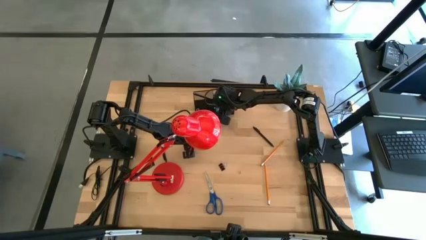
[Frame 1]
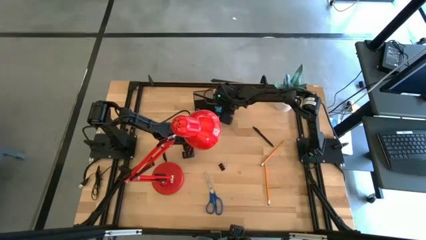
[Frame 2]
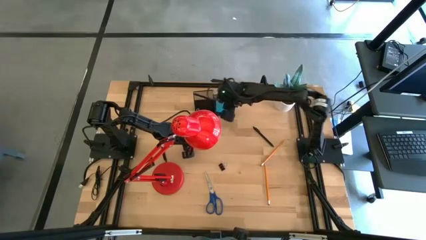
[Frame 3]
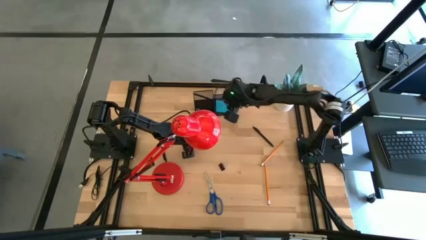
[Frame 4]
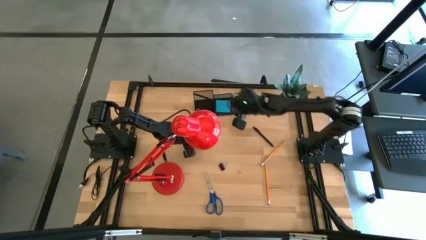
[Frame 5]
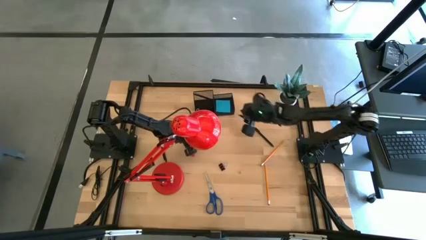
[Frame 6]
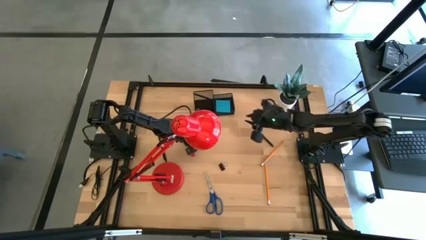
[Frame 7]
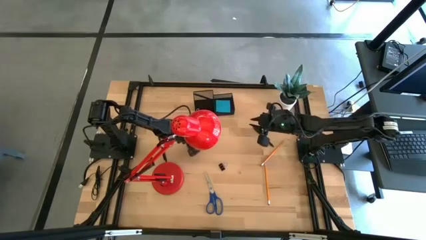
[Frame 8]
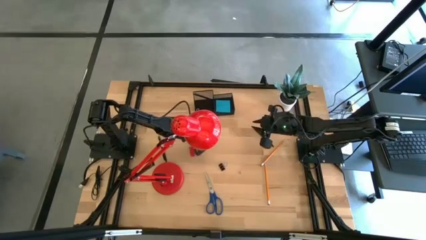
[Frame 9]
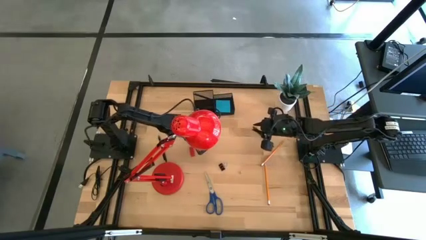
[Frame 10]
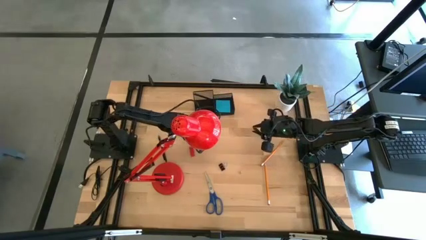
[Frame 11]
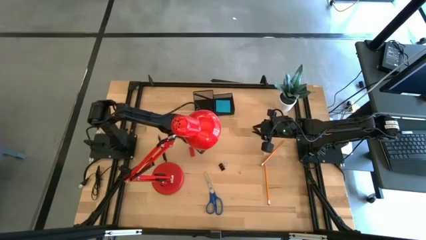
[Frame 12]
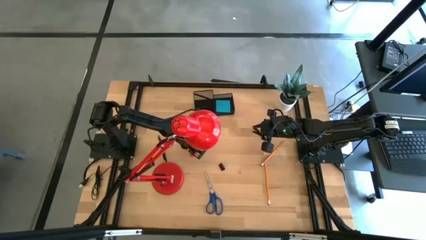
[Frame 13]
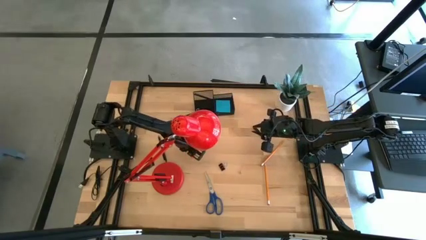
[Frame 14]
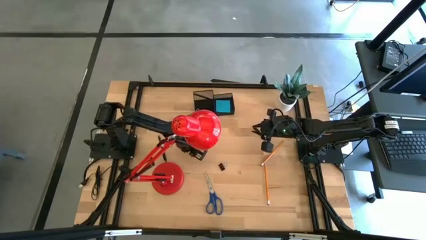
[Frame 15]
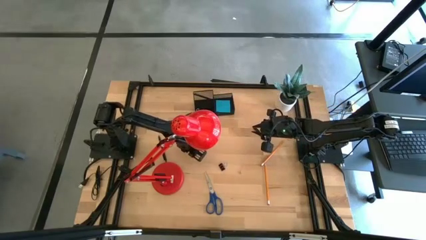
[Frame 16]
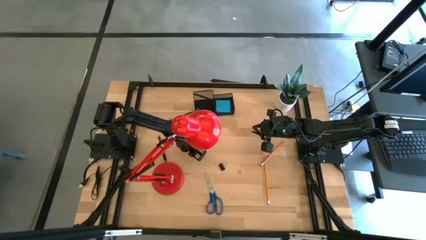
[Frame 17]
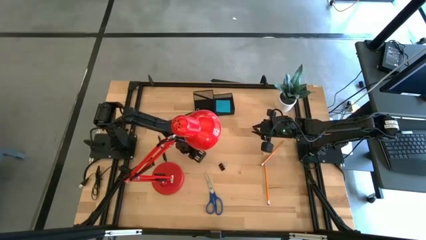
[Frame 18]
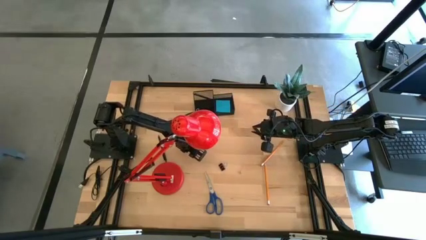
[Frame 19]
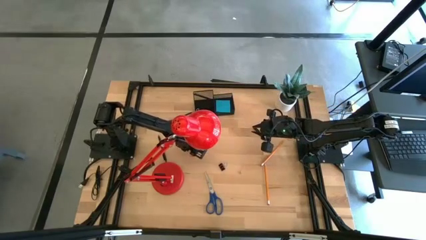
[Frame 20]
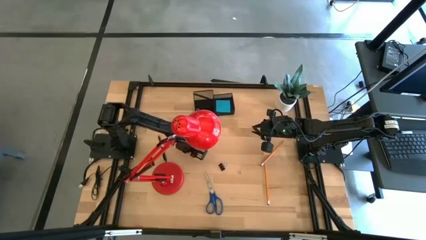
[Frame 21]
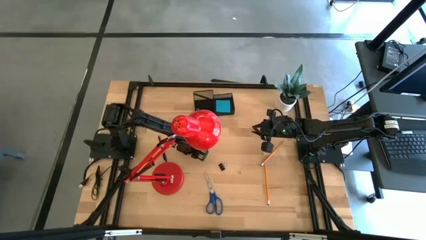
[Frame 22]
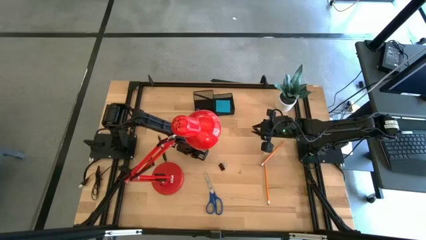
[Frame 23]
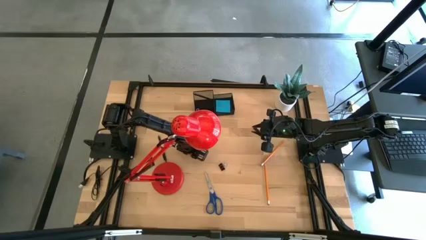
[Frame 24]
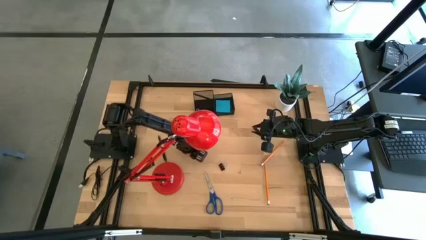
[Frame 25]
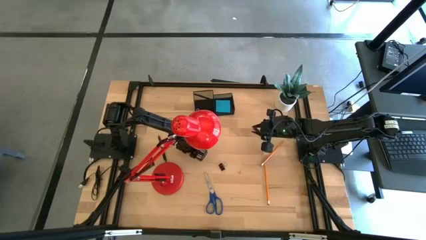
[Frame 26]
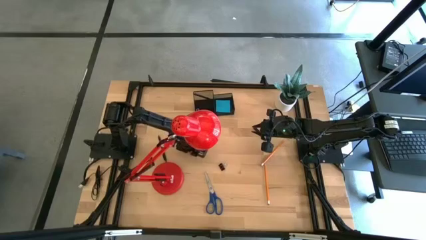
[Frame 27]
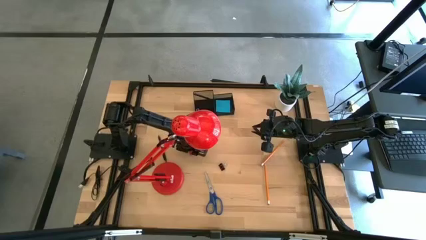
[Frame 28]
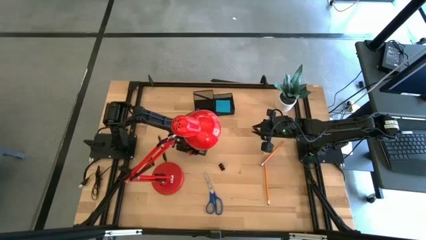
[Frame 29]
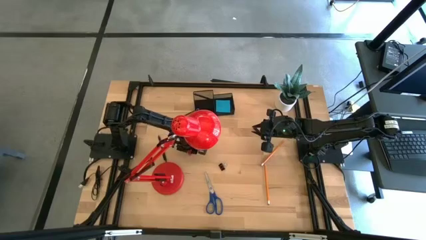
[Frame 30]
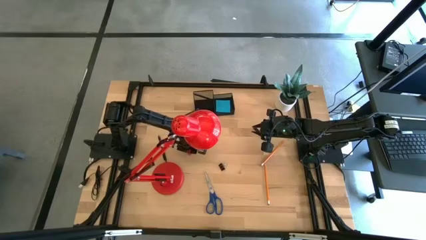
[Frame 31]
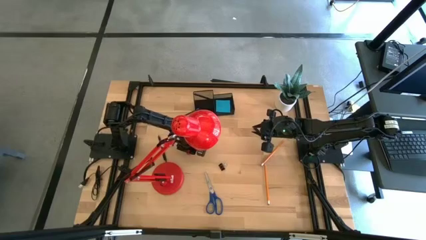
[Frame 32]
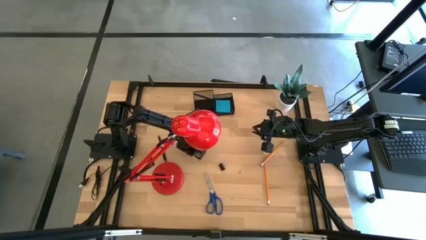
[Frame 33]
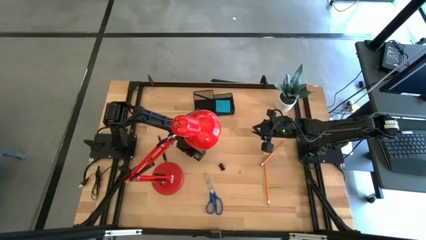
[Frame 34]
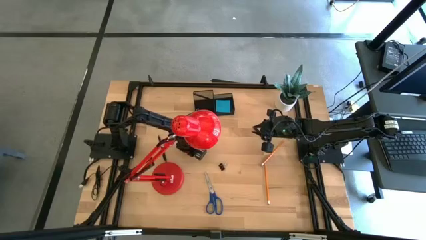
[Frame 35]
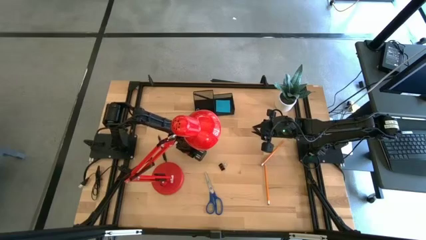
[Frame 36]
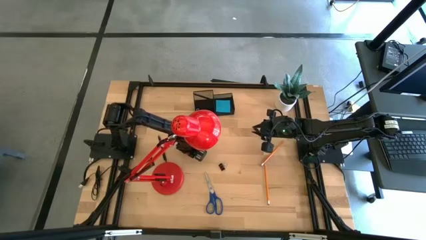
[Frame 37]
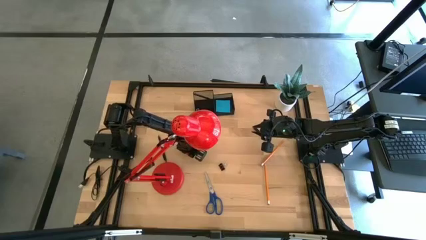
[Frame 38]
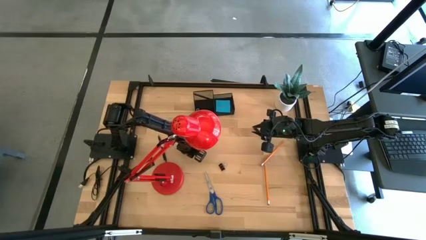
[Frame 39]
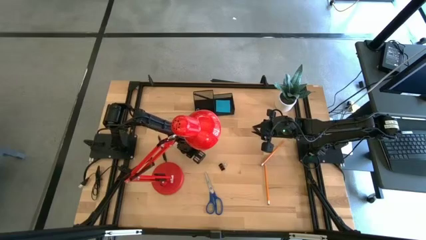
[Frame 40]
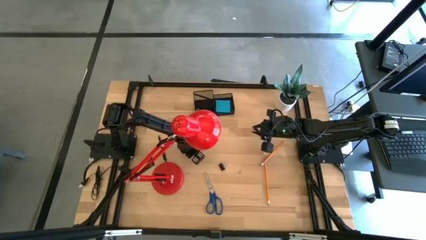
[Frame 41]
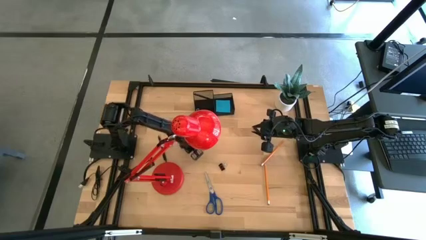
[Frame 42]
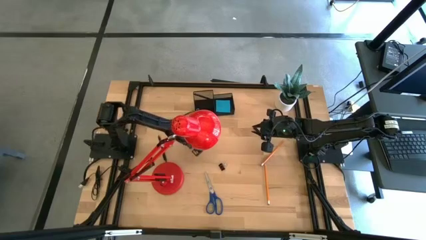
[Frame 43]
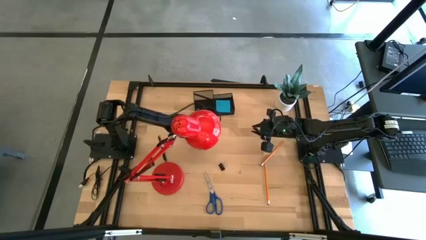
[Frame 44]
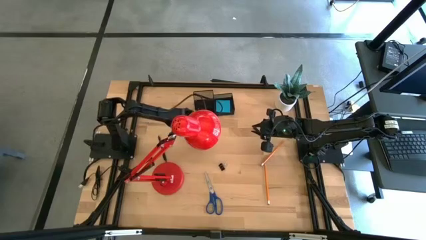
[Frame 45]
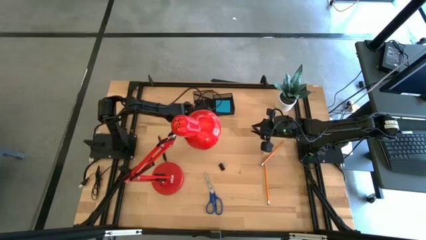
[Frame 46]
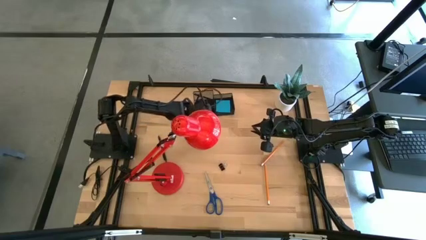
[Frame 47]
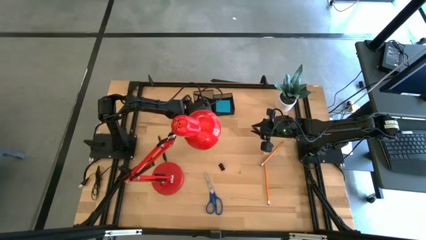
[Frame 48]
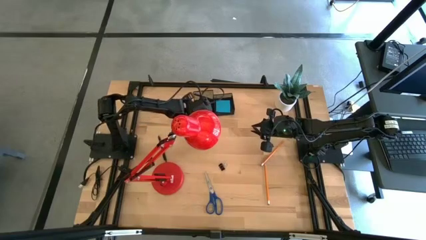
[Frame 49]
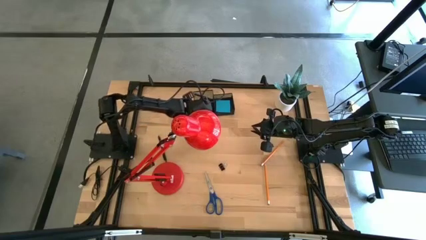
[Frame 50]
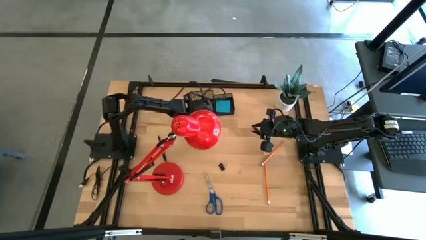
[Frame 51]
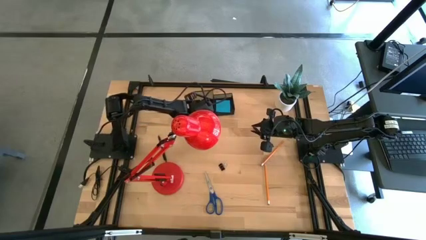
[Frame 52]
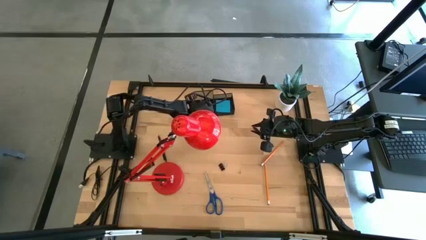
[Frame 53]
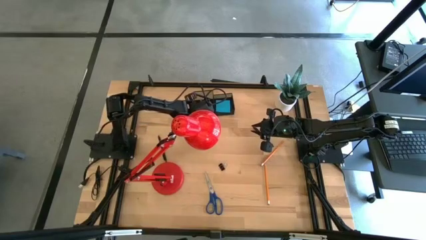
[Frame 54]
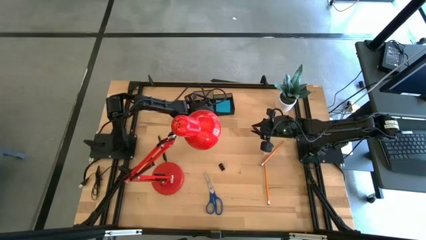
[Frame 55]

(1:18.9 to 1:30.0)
Task: Pick and place office supplies into organizer
Put the eraser into the desk organizer

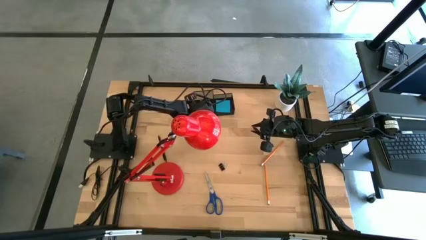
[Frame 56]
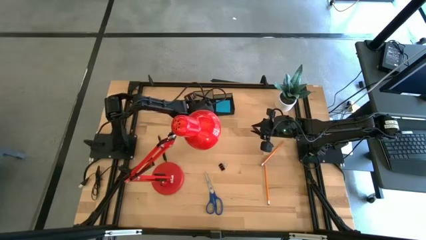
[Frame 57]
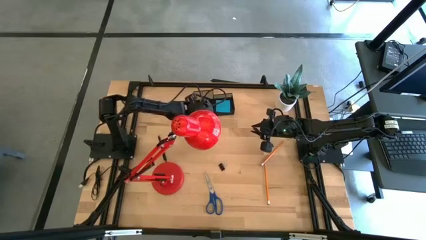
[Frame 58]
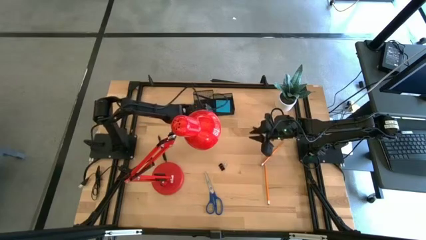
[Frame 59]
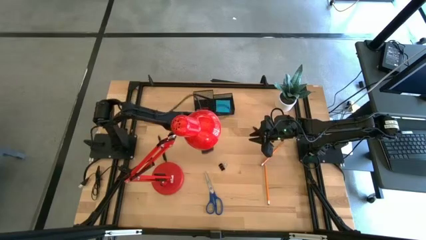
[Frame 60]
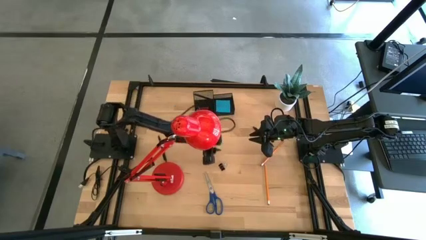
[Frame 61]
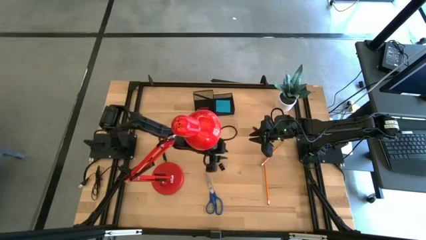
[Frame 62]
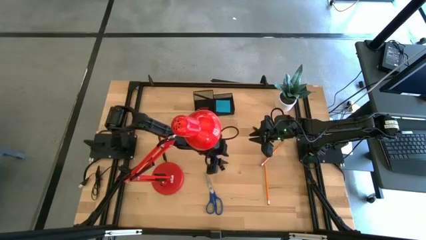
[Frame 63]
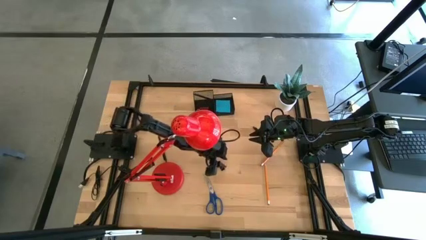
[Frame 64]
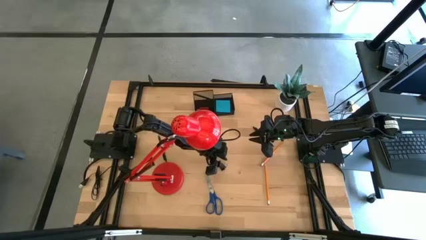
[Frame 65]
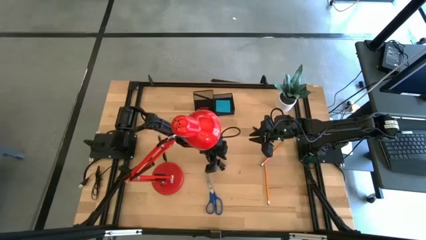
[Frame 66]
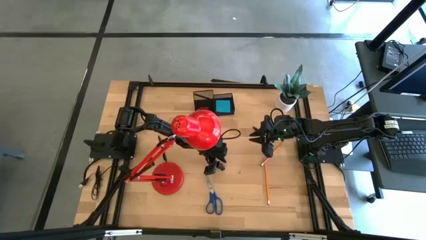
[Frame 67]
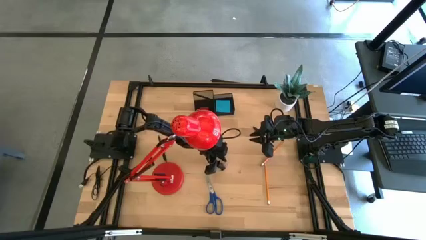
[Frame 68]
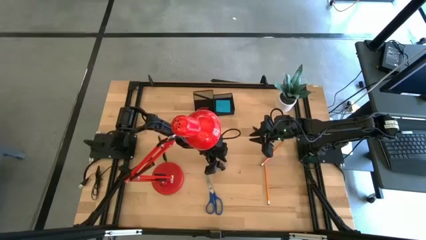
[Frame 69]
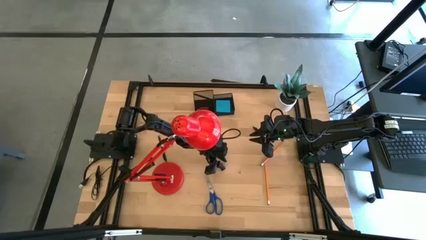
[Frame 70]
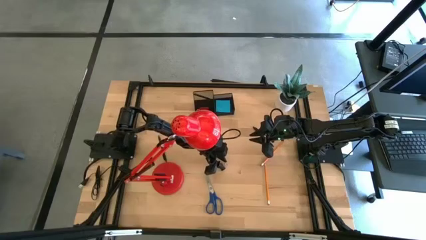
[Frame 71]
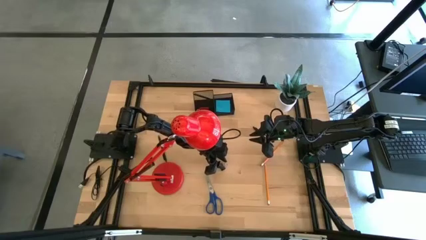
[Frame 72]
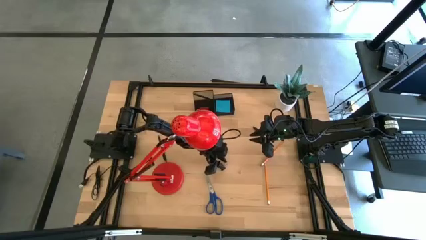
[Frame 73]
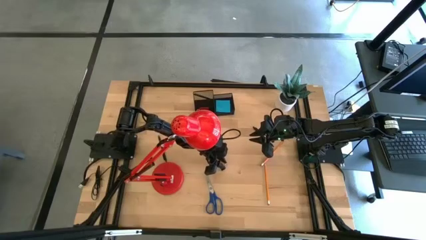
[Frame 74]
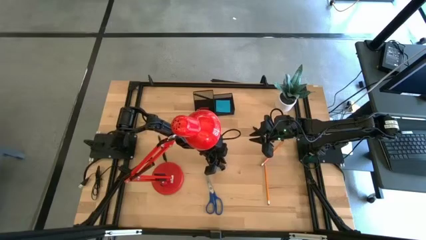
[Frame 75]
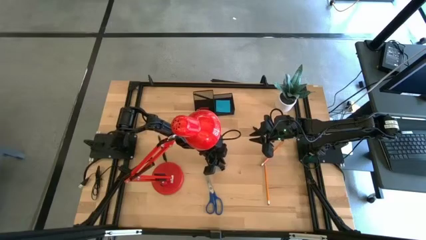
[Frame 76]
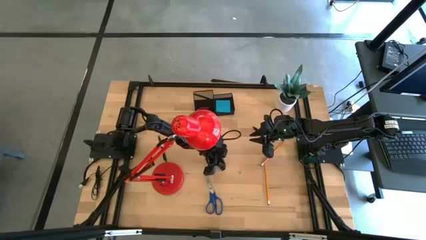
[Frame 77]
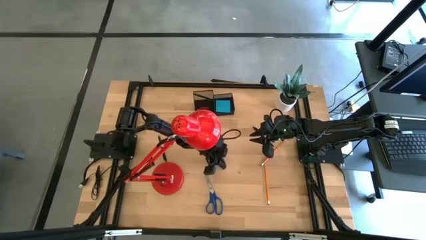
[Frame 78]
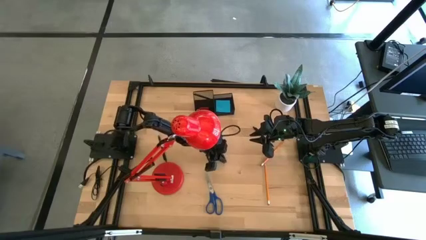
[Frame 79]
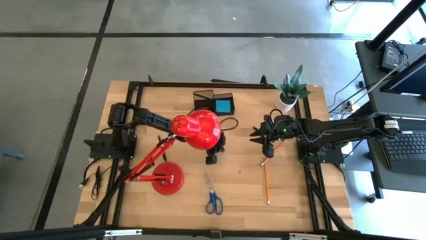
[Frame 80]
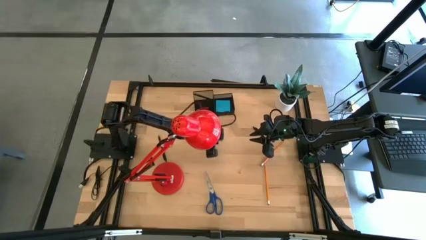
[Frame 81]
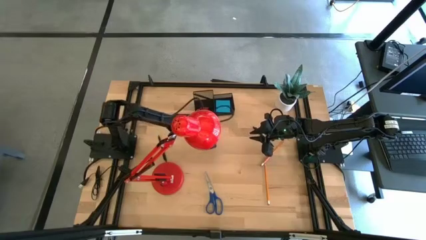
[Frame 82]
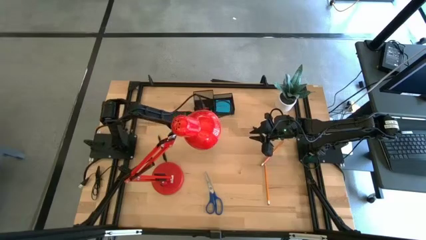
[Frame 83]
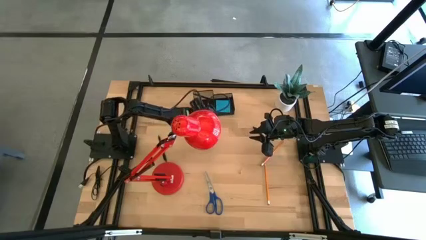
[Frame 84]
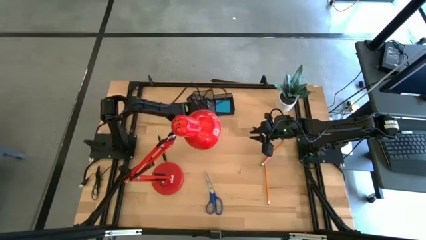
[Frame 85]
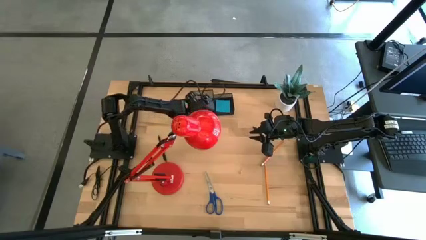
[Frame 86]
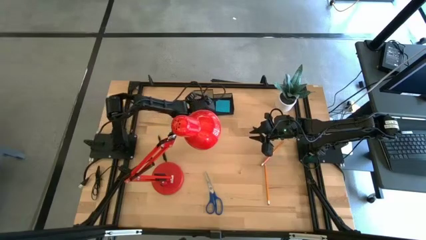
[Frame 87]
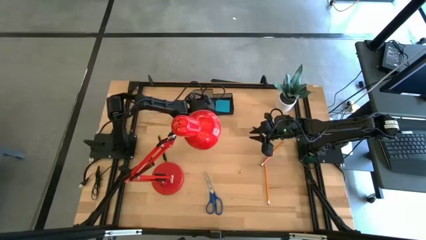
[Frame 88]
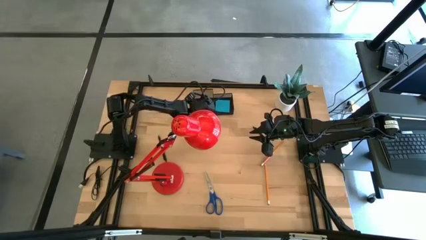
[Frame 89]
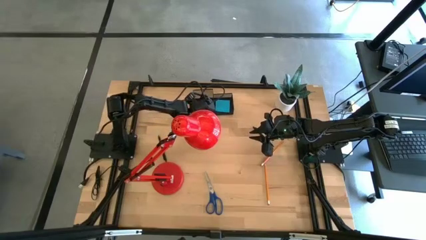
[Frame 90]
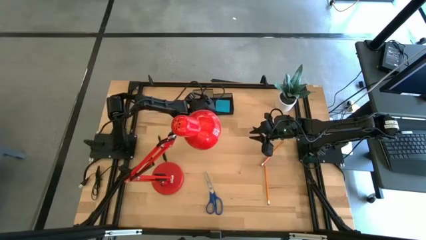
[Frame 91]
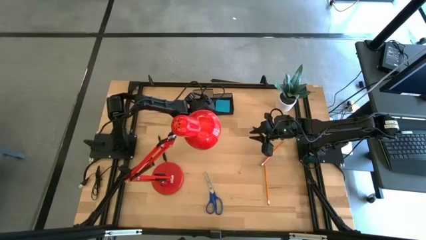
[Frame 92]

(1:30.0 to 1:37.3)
Put the binder clip into the desk organizer
